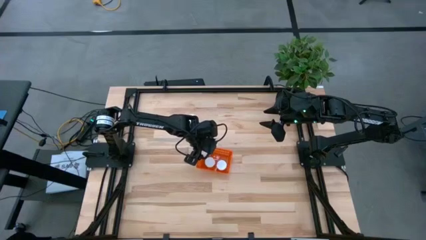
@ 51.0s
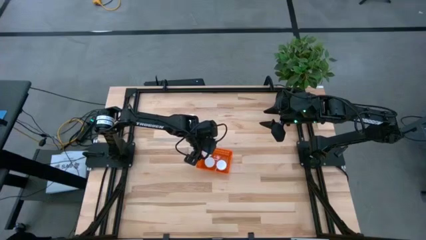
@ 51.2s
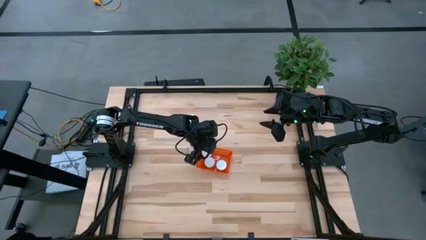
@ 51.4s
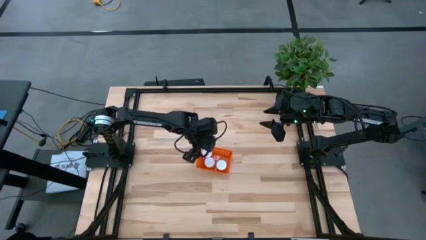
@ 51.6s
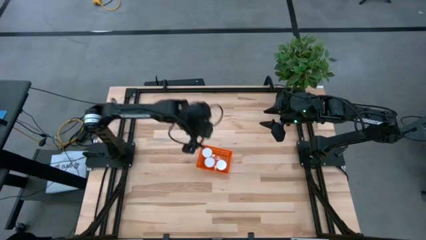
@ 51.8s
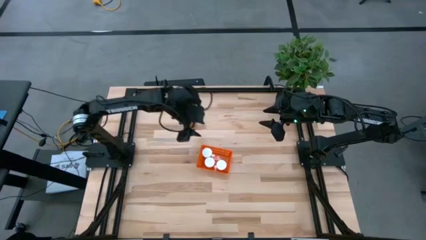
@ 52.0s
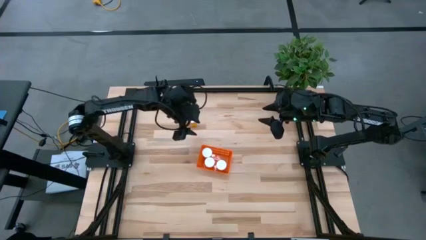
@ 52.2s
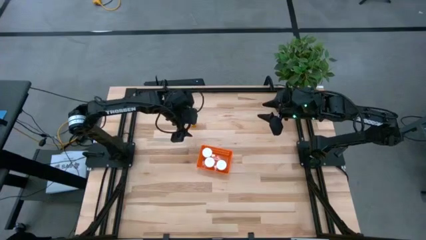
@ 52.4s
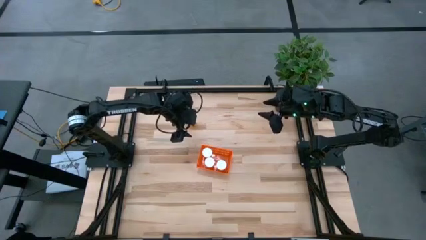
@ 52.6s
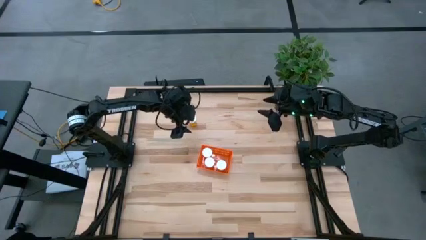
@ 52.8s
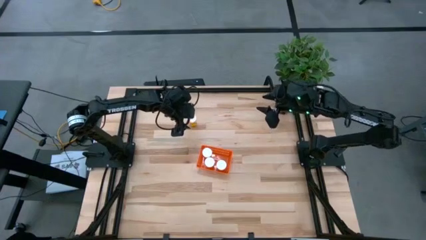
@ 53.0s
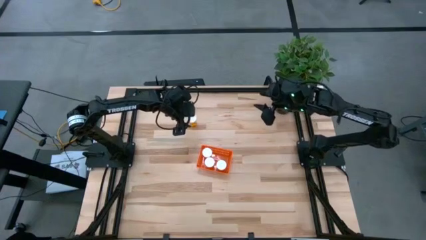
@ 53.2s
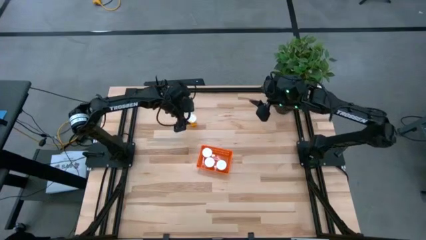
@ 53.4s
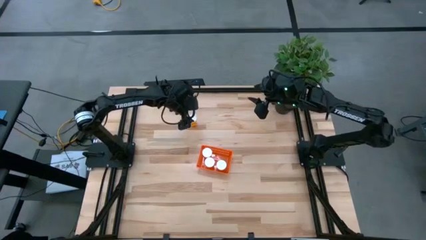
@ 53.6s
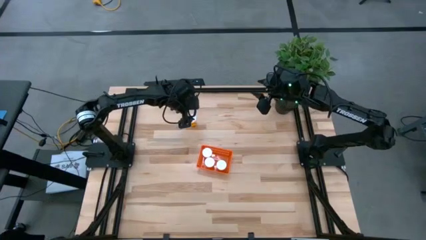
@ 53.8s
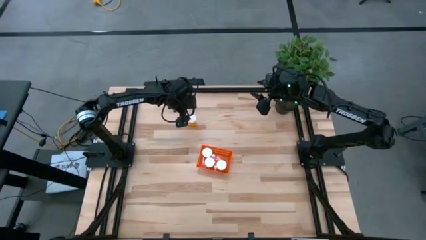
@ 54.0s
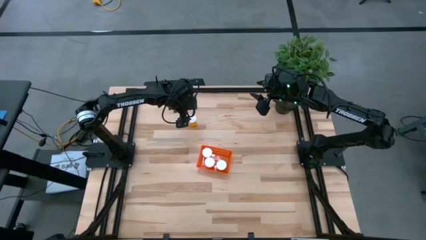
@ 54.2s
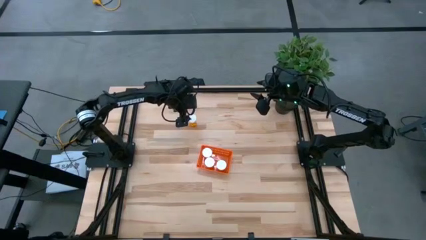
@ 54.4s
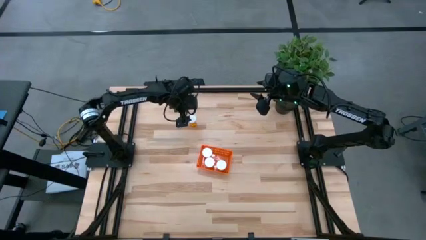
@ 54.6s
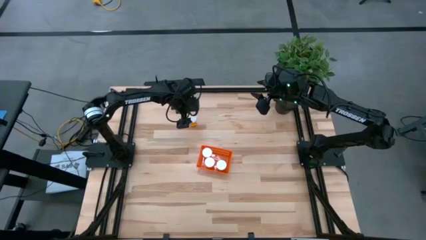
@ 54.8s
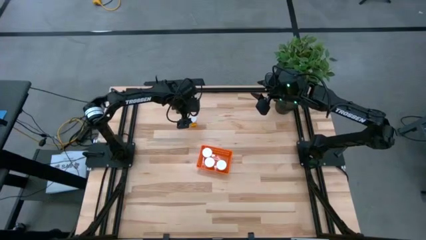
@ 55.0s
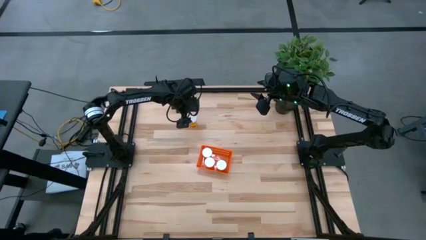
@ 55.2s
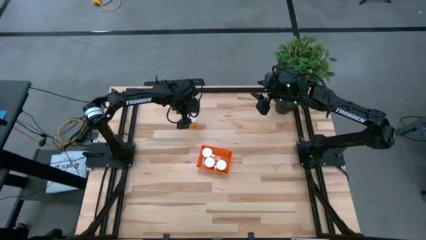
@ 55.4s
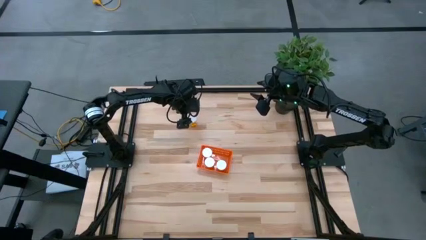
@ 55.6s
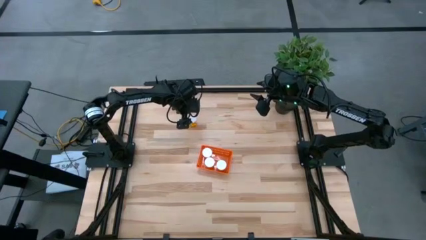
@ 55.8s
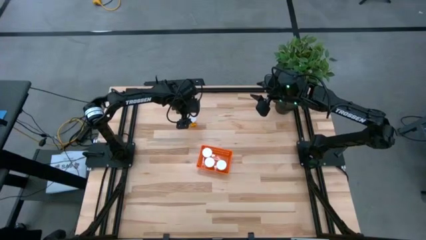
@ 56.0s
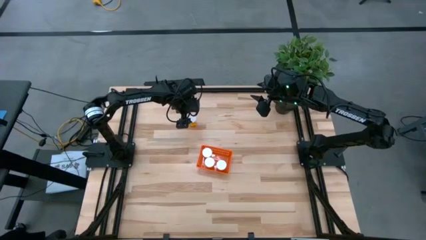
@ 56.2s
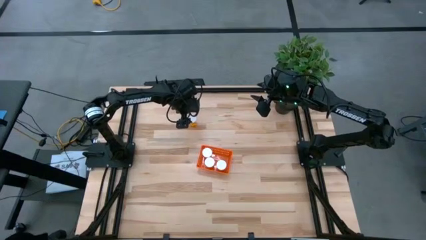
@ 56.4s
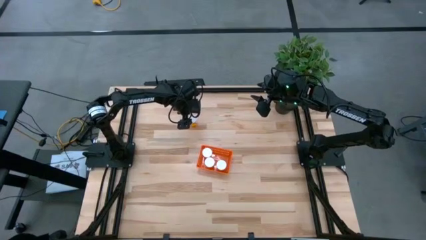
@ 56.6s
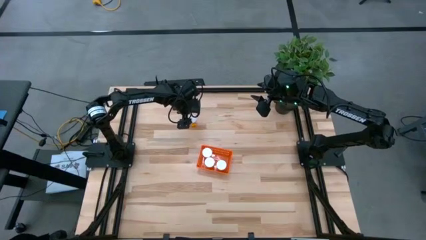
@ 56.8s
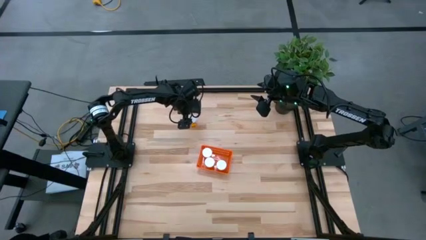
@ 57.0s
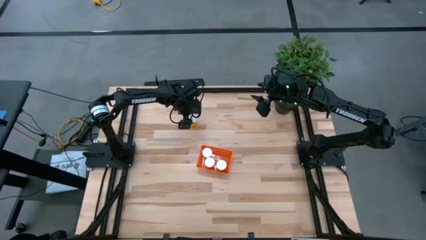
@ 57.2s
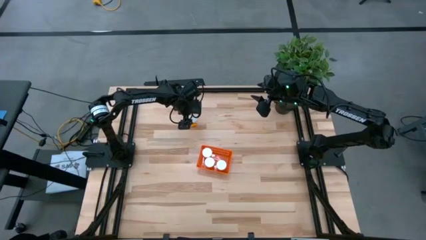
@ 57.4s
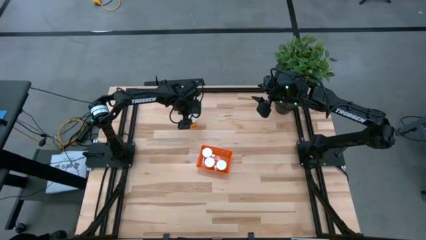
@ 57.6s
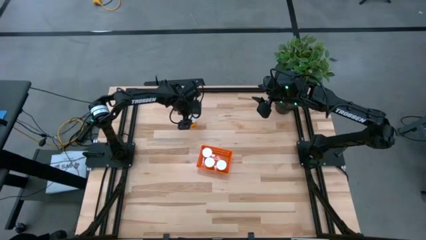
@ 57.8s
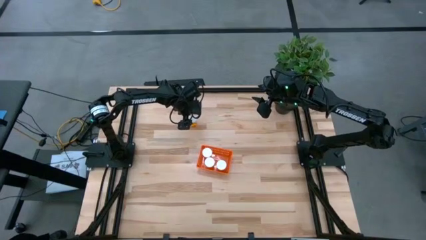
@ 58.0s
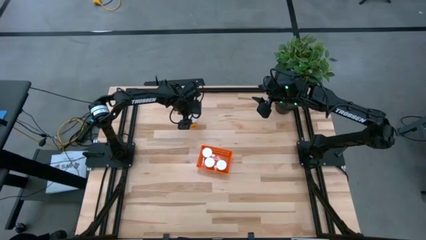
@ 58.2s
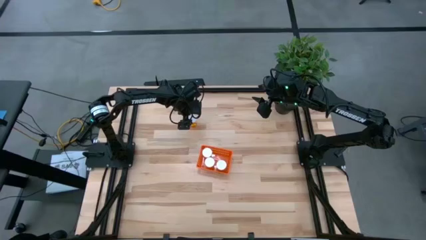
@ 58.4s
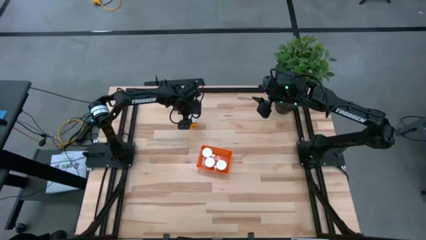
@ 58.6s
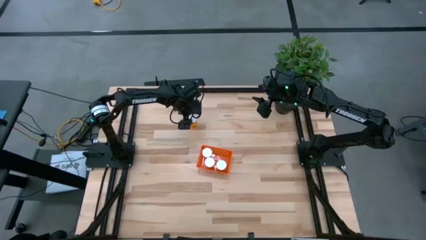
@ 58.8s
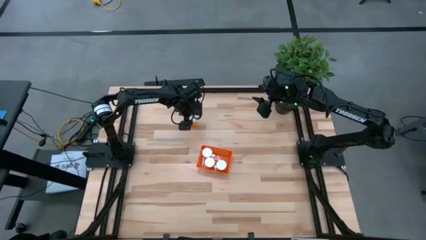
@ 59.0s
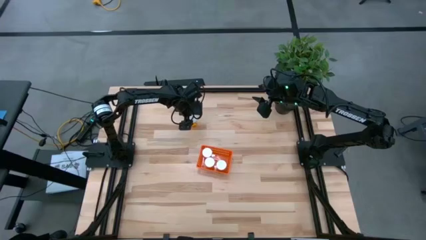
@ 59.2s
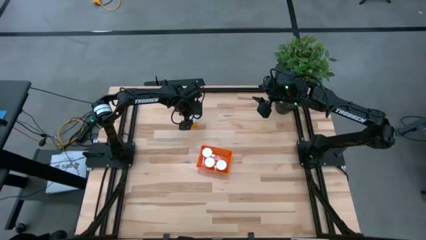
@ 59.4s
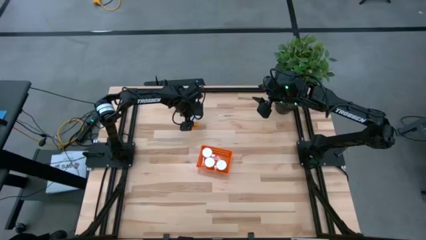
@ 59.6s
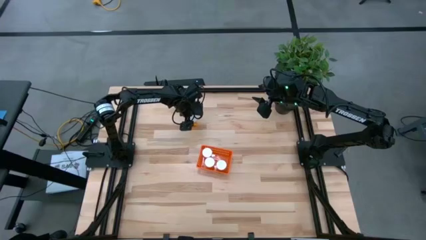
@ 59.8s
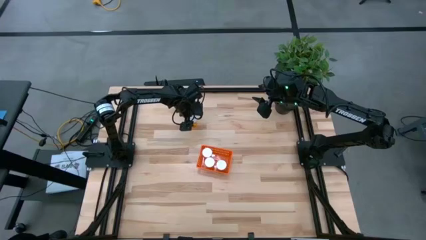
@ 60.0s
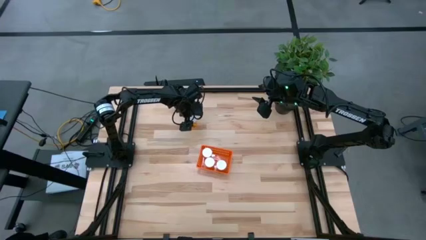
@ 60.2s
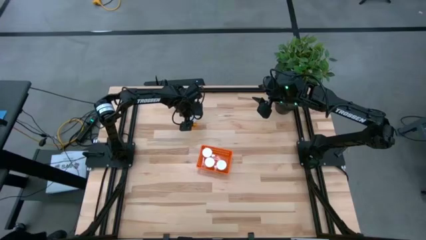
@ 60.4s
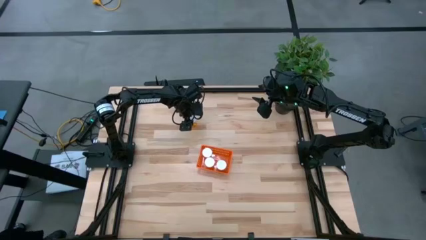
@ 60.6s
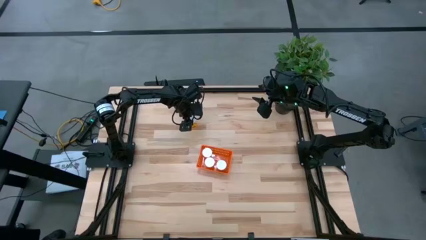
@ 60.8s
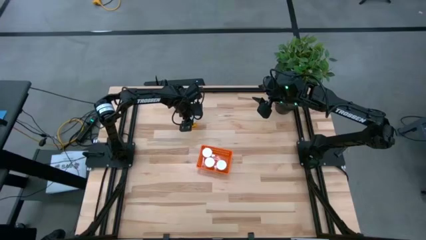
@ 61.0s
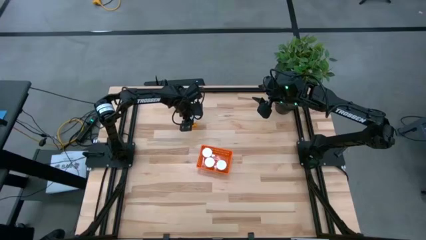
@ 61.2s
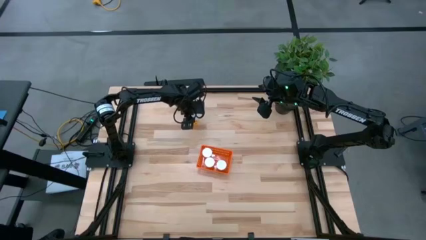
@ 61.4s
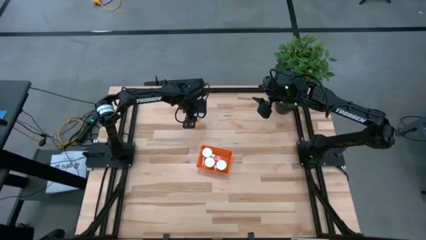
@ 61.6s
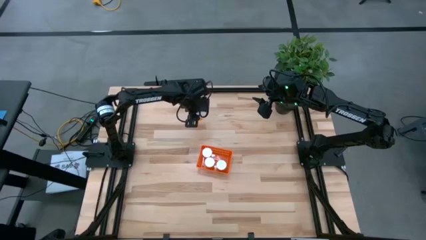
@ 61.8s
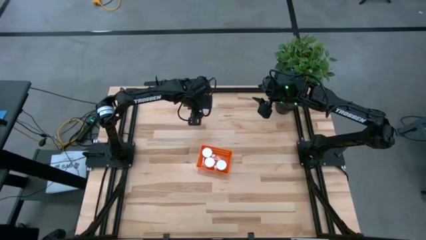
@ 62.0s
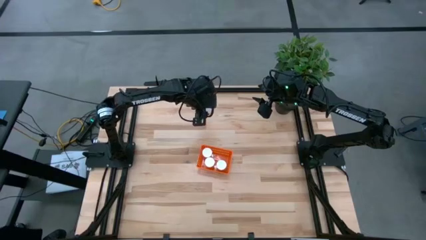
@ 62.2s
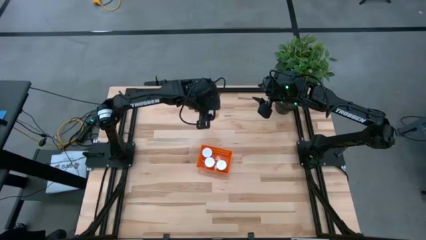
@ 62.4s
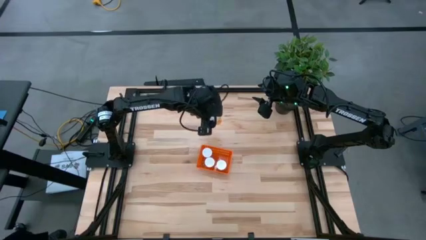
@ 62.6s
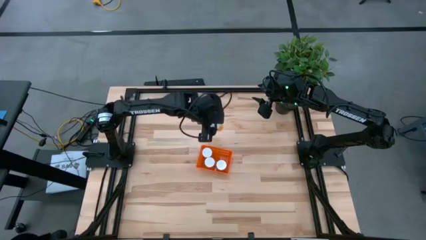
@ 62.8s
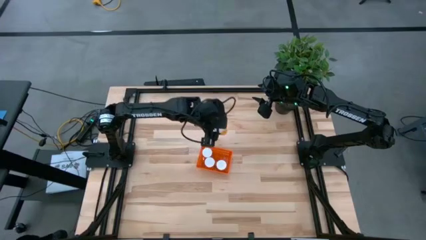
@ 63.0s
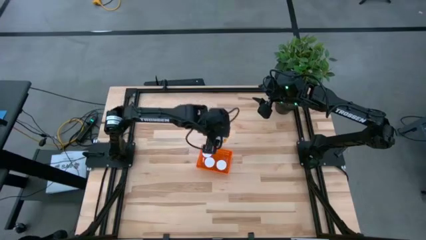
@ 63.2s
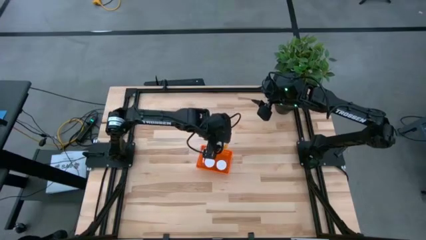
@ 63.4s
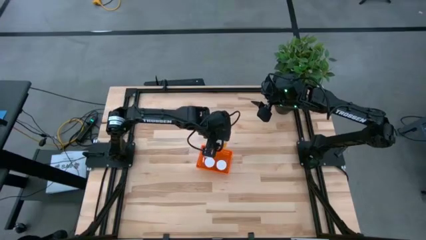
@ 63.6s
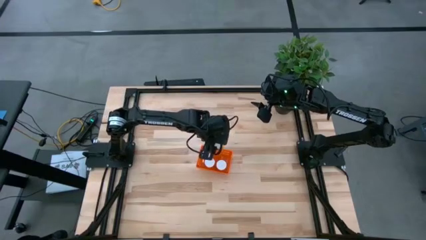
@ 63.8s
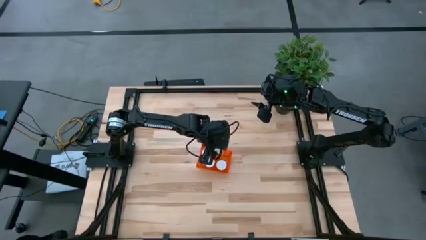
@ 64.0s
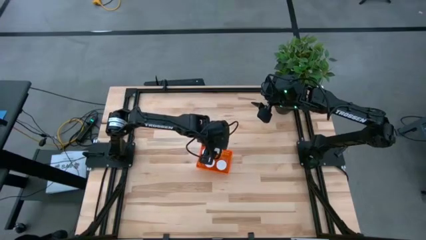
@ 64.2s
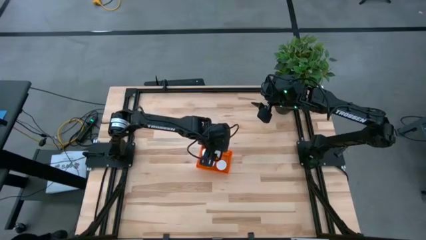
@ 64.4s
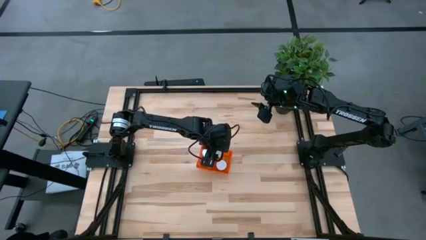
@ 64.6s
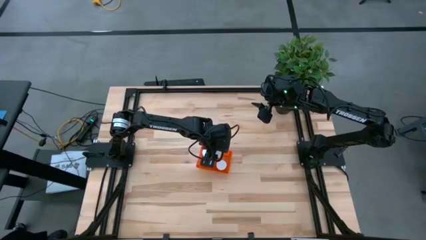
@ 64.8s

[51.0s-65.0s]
Task: Pick and place pill bottles into a basket
Put the orange pill bottle into the orange bin

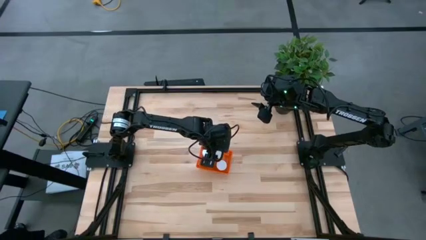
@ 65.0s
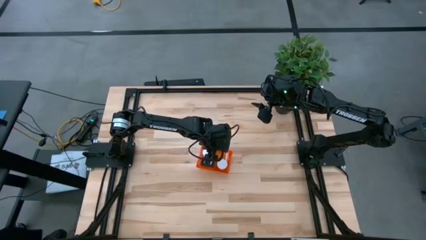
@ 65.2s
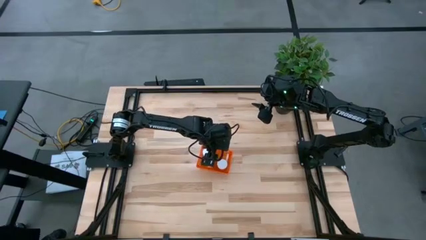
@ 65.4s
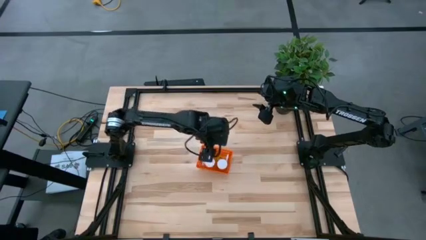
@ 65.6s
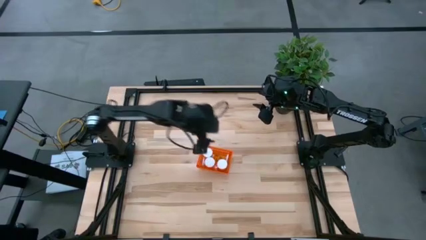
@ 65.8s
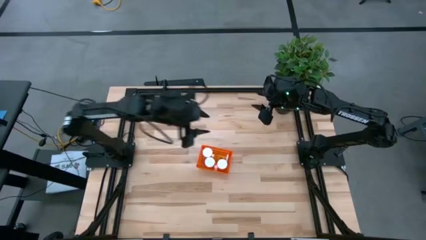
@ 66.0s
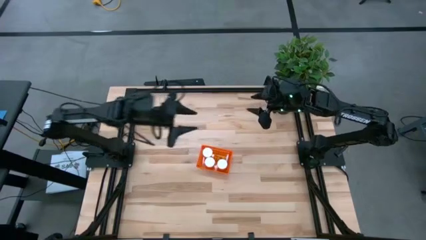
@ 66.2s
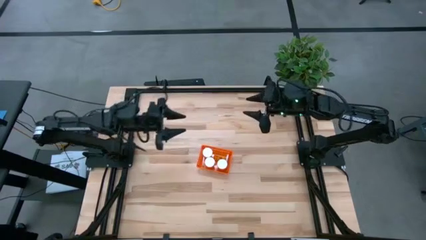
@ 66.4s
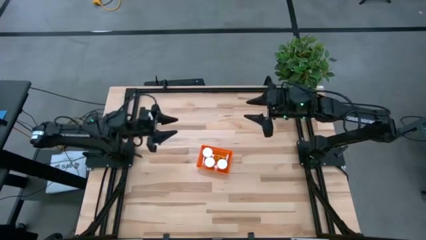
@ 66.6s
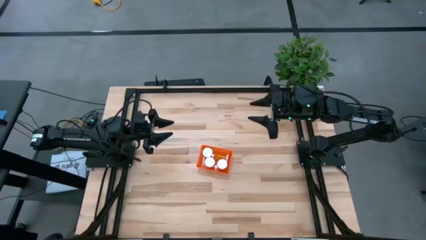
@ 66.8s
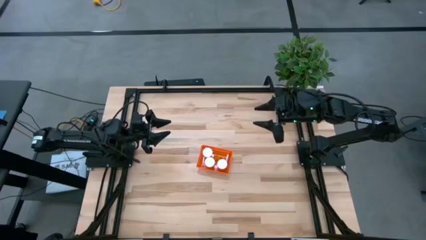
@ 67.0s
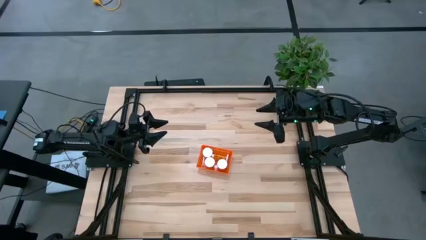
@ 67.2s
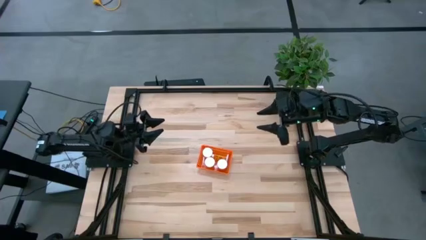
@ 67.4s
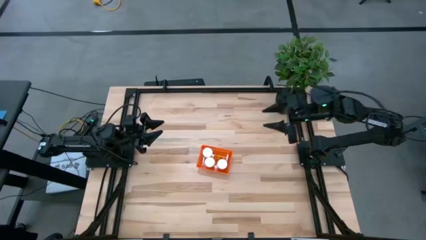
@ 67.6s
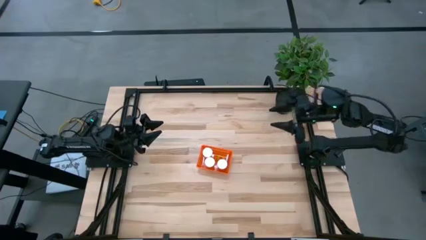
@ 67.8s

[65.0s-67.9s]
Return to Home Position
